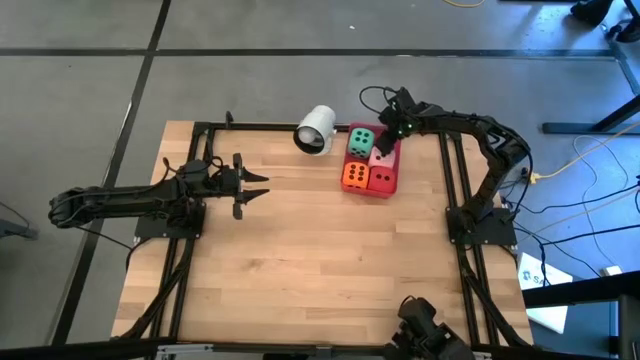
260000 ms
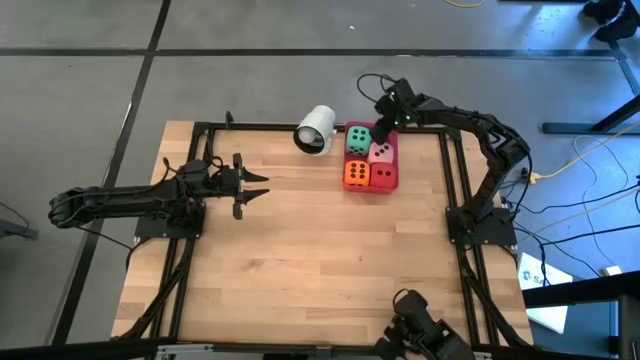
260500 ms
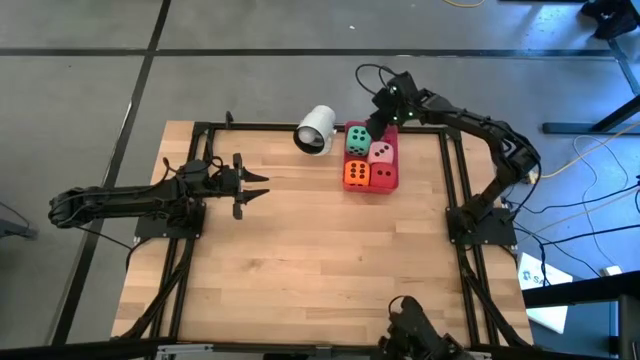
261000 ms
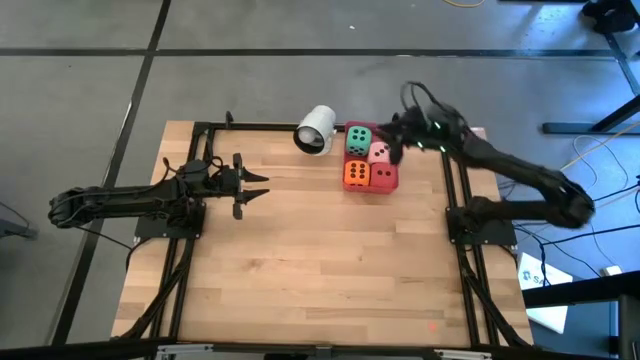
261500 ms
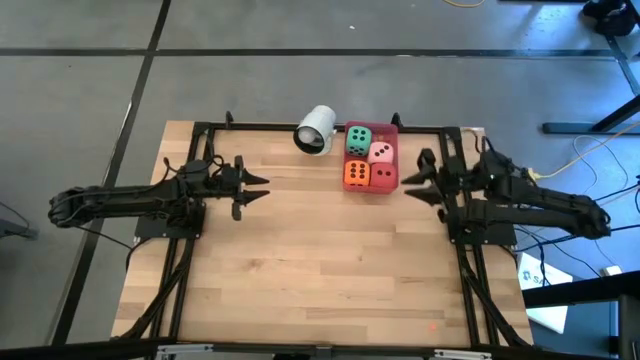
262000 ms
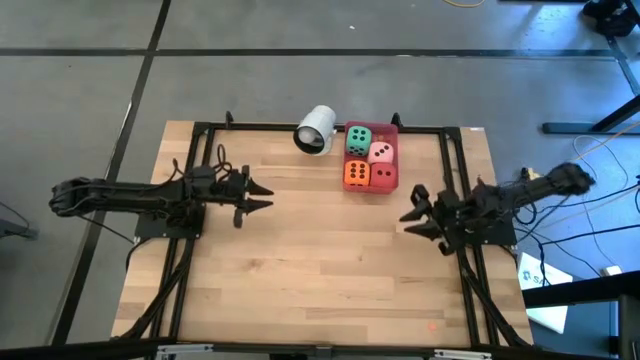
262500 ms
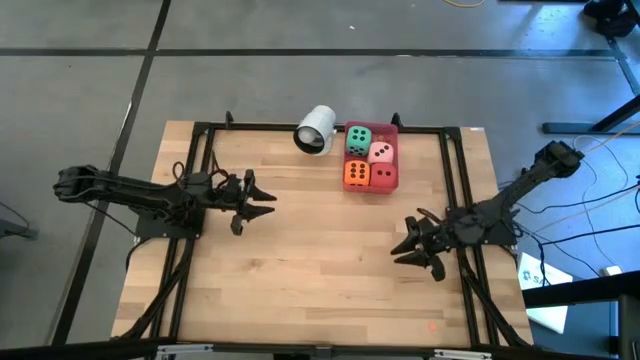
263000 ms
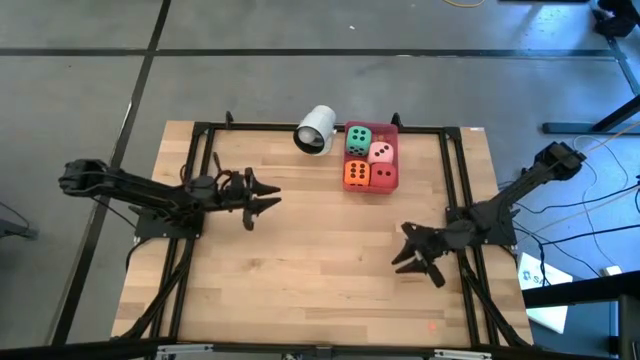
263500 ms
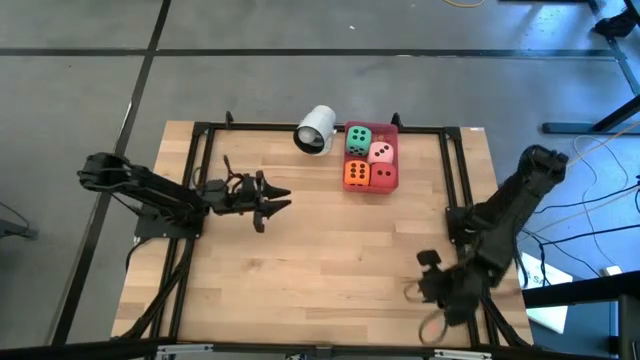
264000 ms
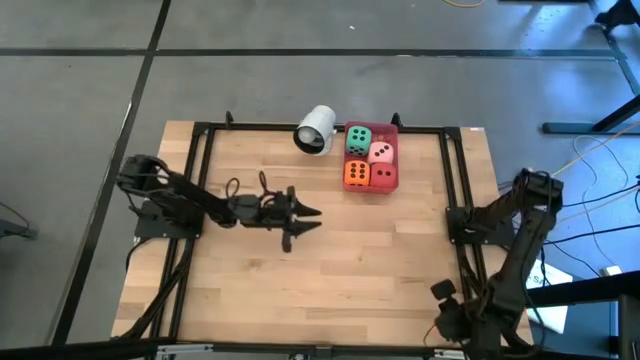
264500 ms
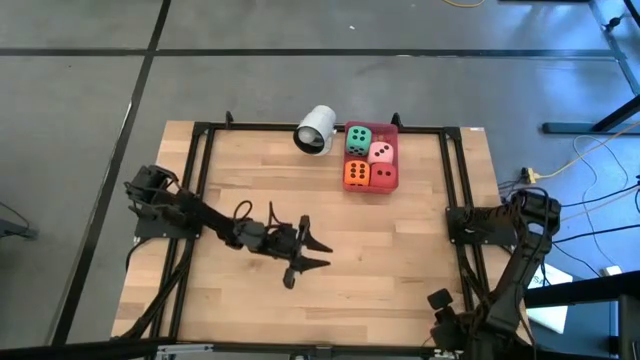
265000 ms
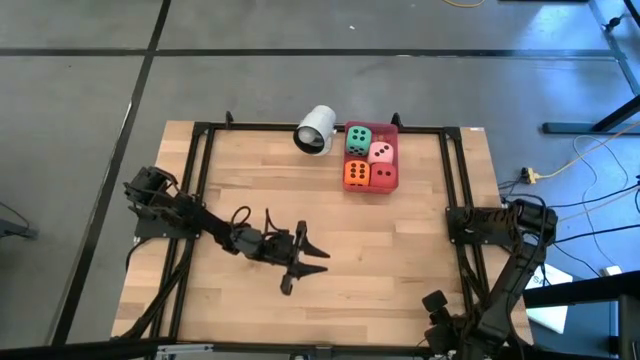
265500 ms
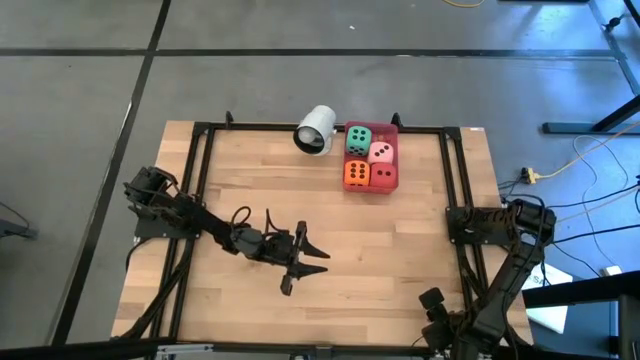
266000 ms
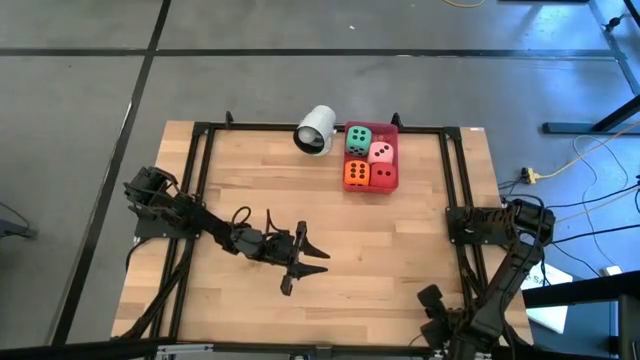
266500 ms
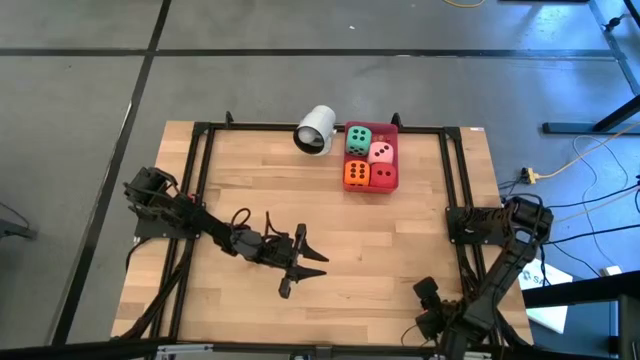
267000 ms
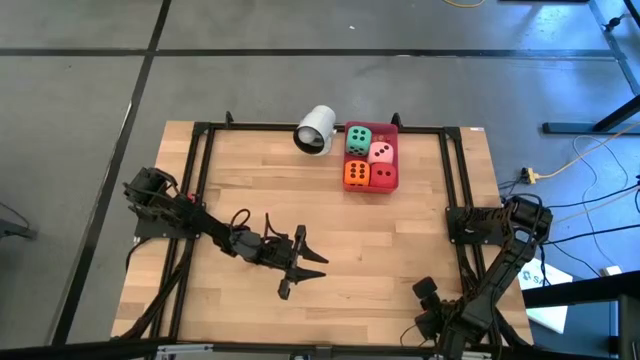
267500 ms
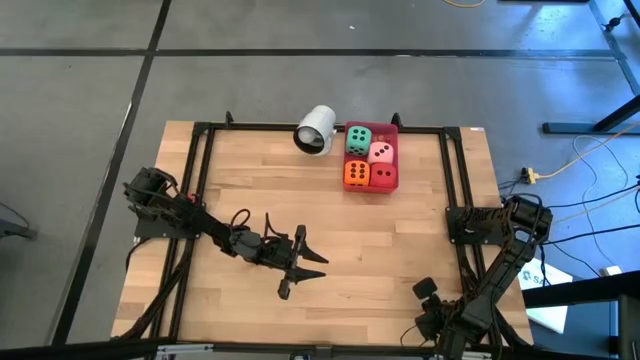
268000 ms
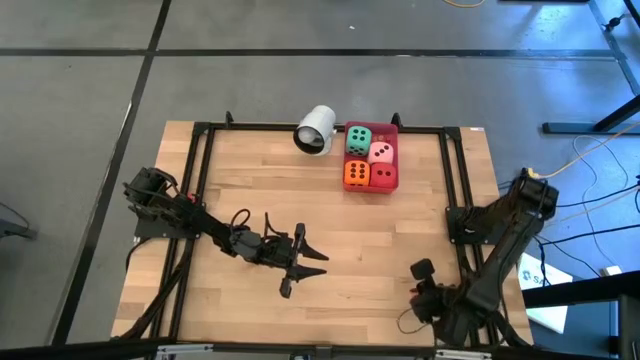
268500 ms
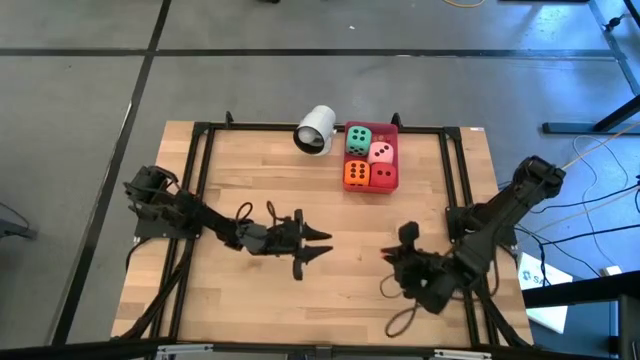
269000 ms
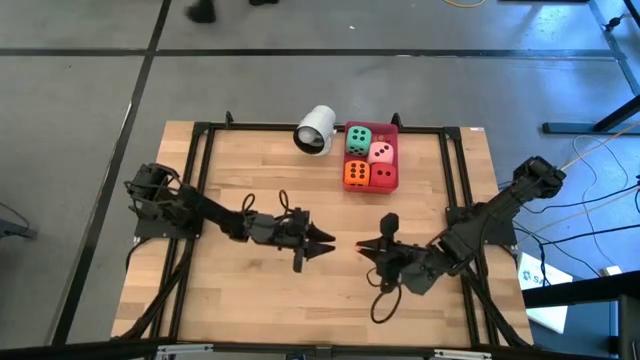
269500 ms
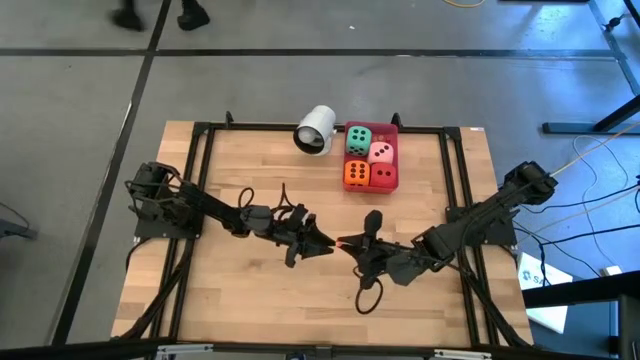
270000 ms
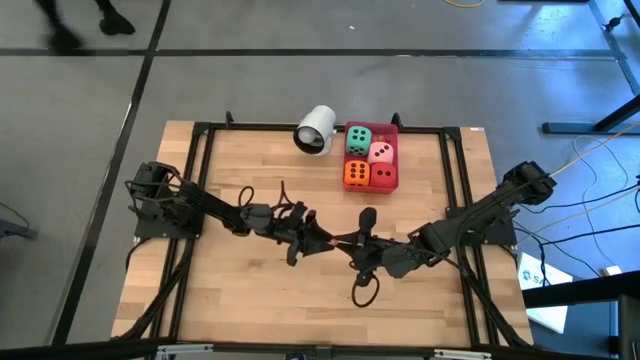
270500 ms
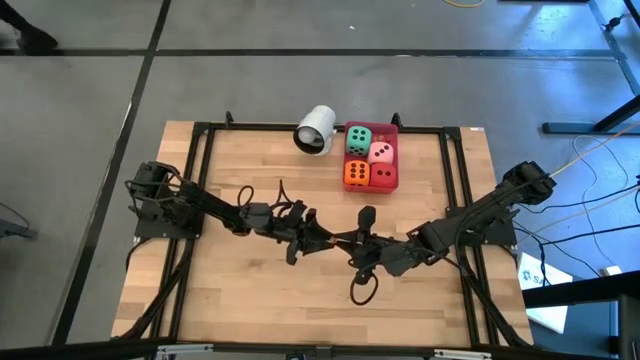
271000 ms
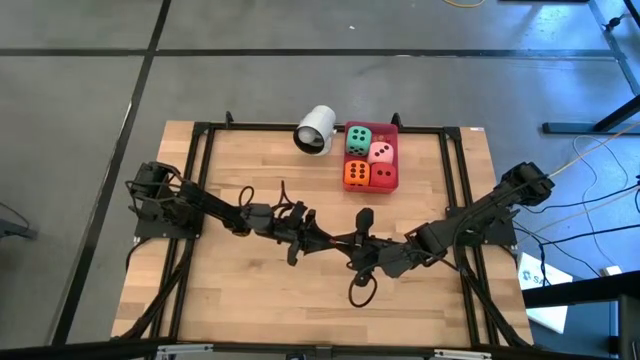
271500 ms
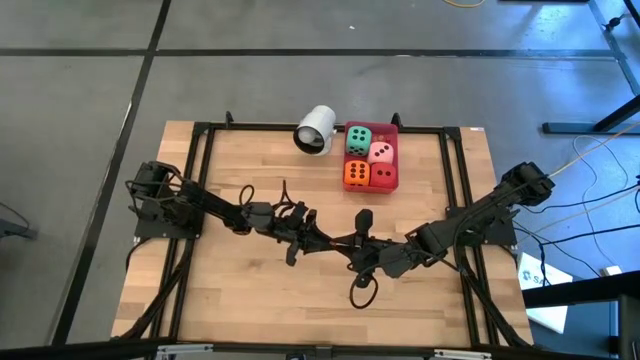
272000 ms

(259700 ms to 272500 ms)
Task: Pick & Place Dice
Put the small orange dice into the red bin

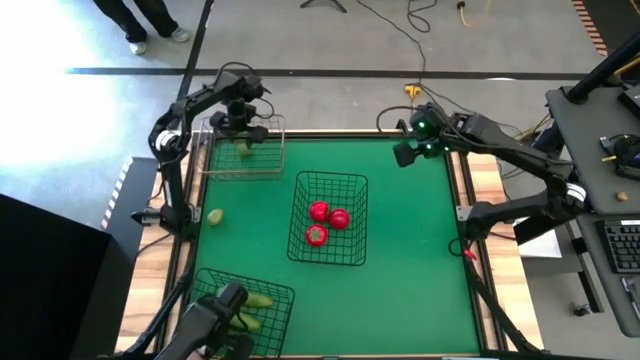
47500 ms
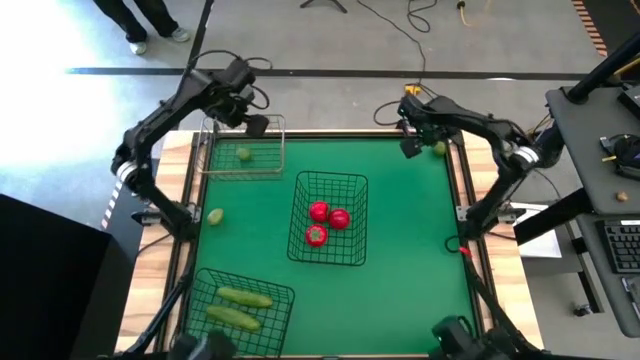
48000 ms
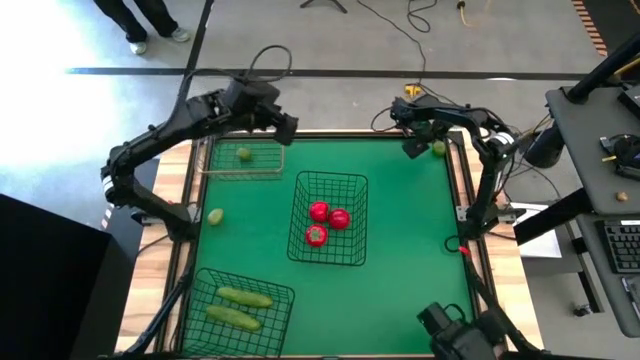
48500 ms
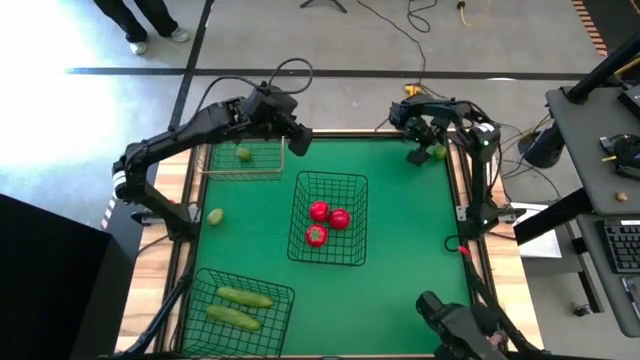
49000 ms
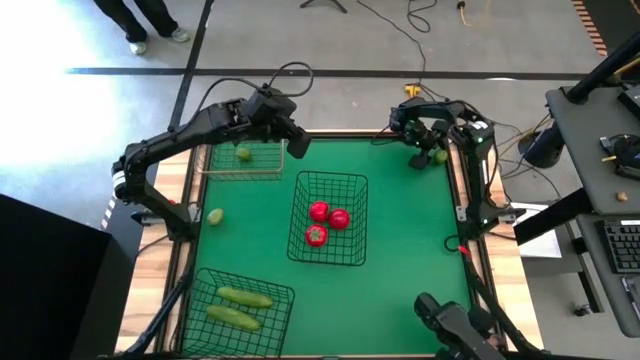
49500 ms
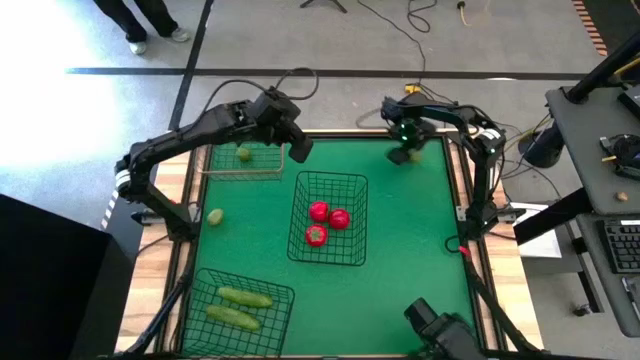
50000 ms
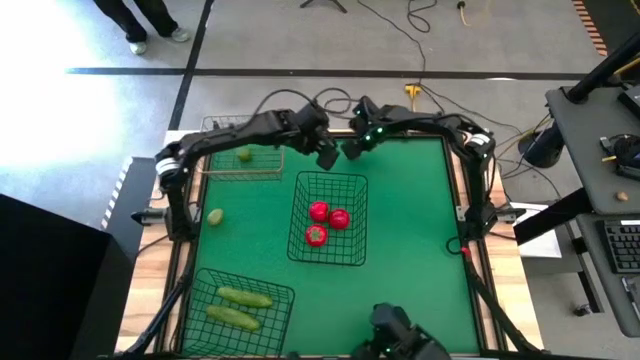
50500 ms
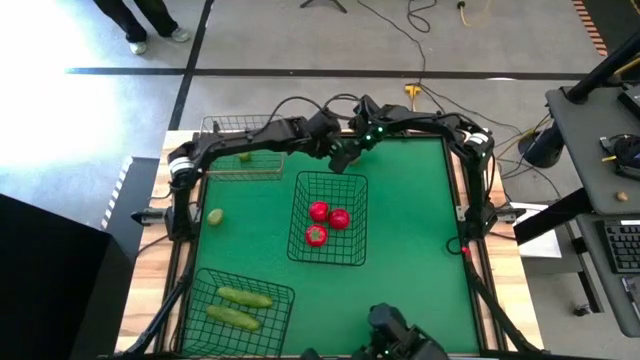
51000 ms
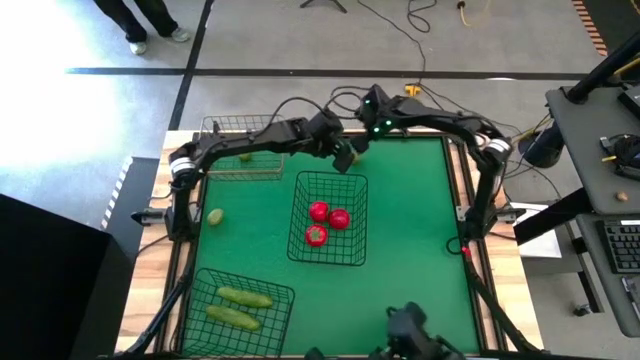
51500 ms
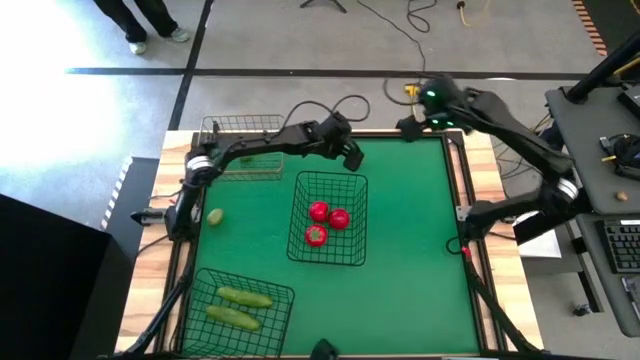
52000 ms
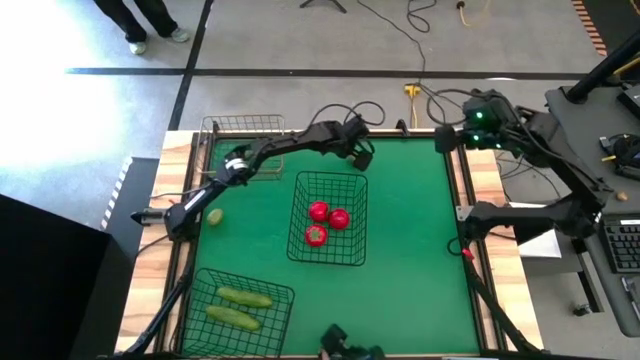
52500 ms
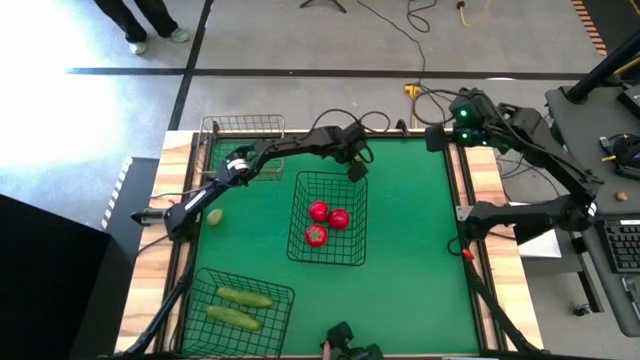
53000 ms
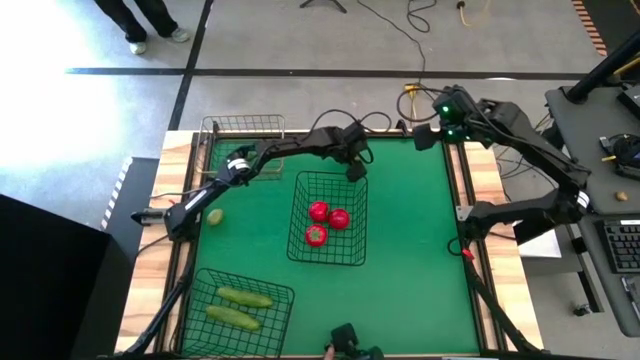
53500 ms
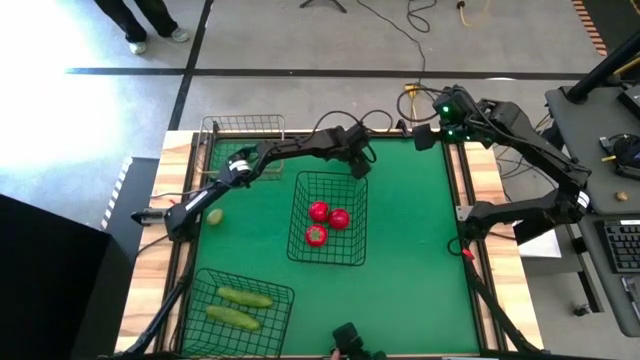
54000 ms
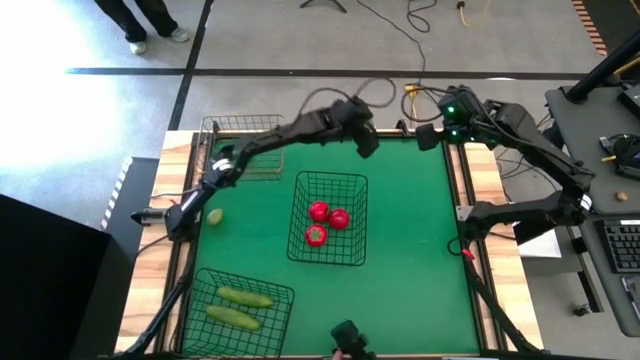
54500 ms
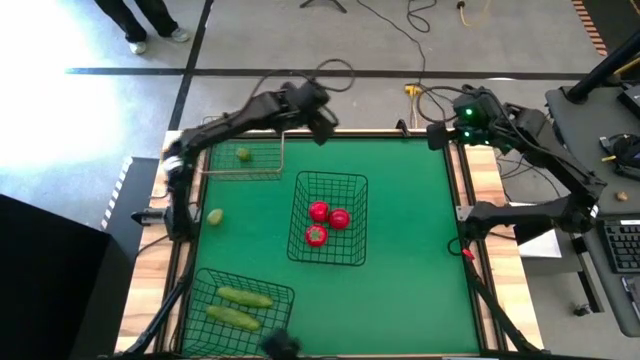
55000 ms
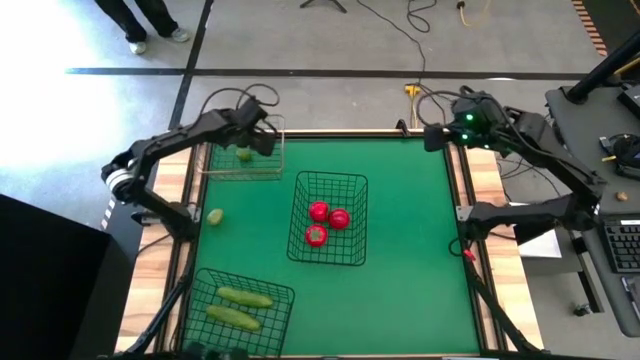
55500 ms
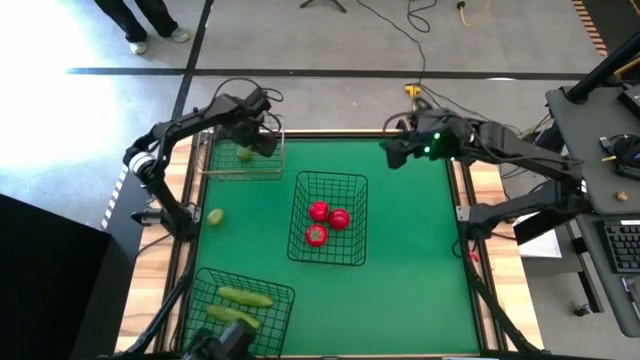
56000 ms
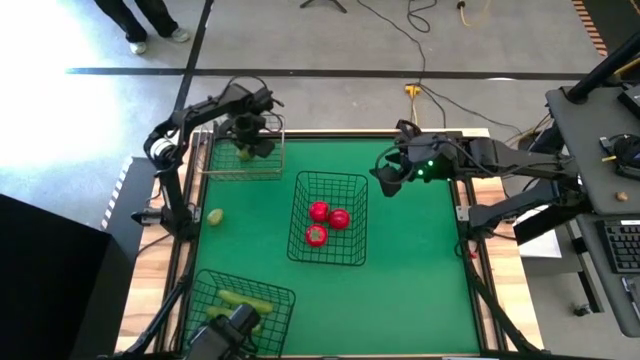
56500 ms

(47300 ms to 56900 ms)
Task: Sort produce into baskets
Put the right lime into the gold wire basket

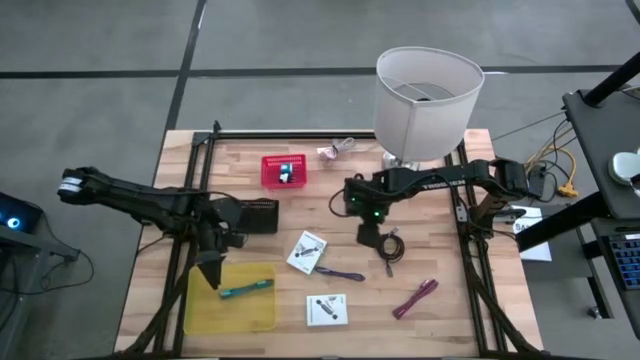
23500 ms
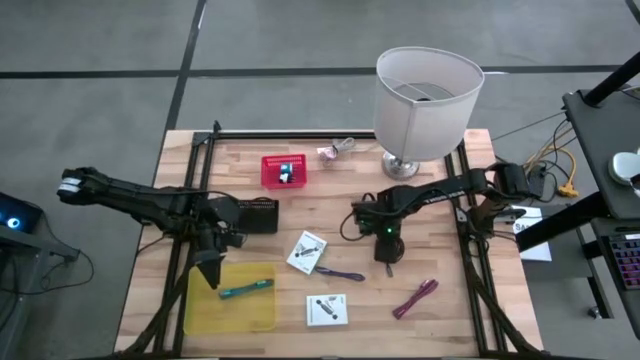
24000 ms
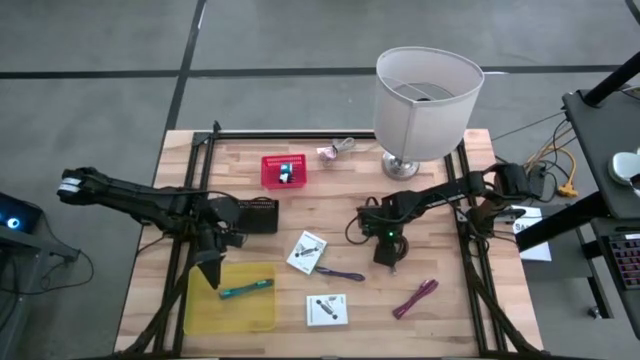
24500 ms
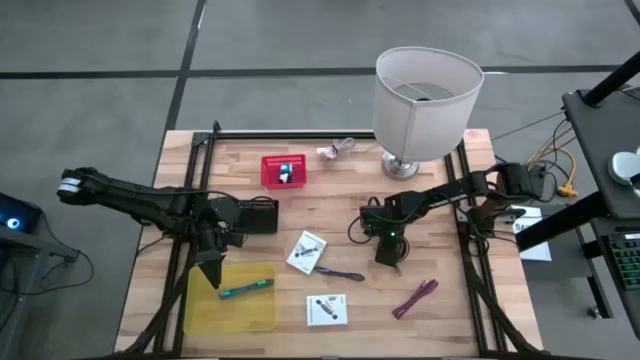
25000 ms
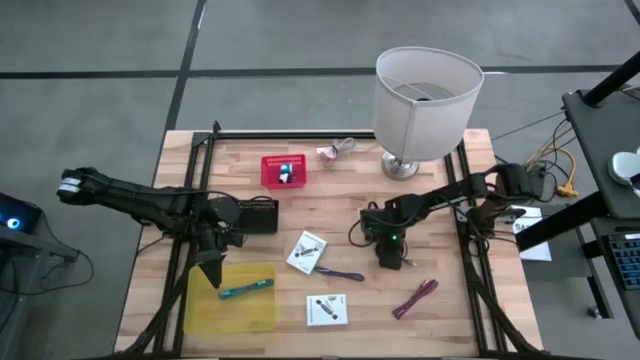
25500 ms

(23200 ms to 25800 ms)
Task: Pick and place items into bin
Put the black charger cable into the yellow bin
